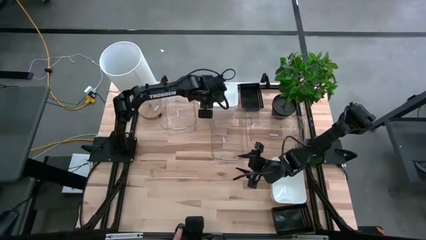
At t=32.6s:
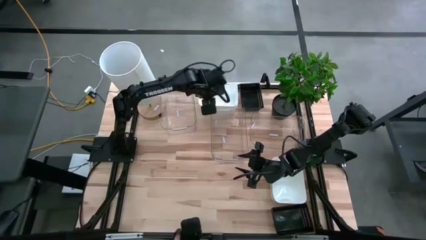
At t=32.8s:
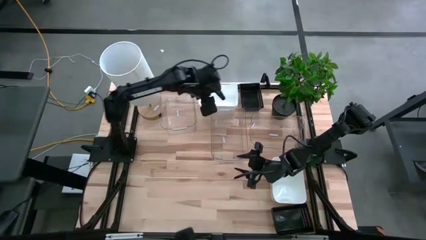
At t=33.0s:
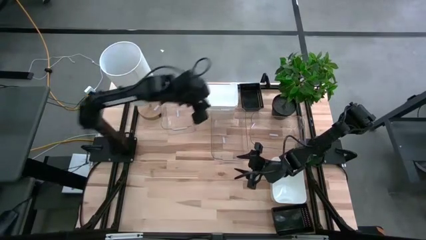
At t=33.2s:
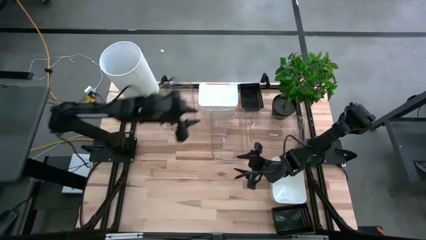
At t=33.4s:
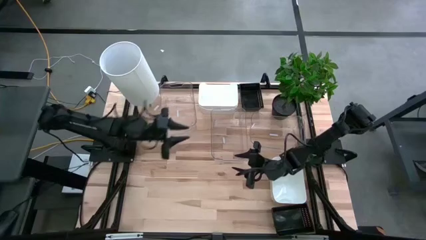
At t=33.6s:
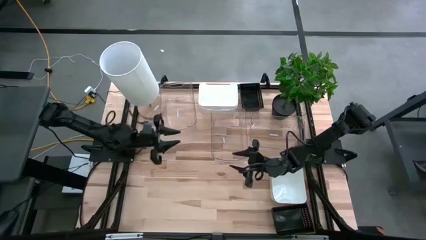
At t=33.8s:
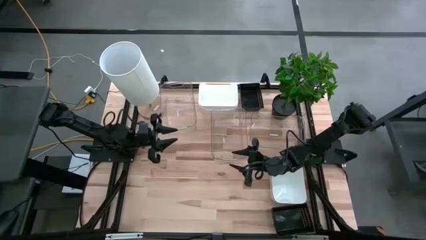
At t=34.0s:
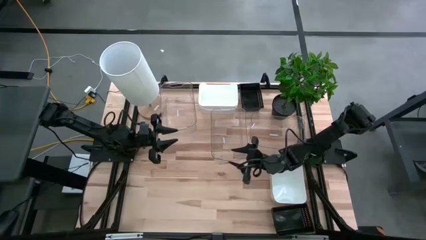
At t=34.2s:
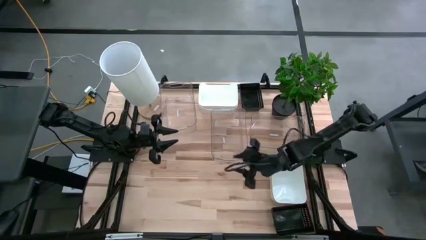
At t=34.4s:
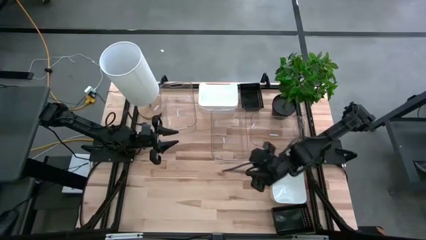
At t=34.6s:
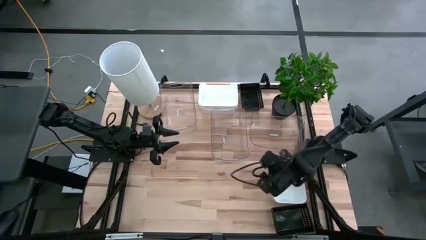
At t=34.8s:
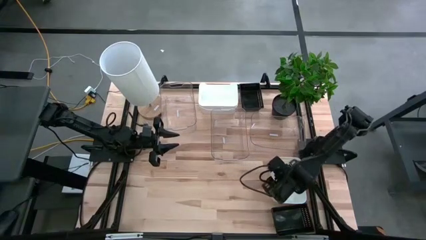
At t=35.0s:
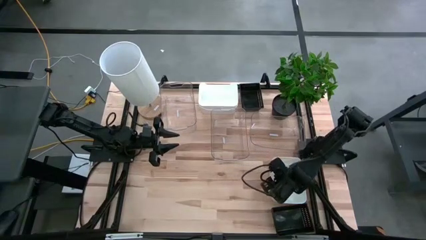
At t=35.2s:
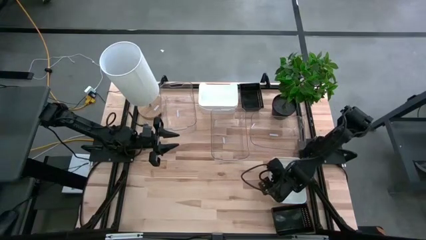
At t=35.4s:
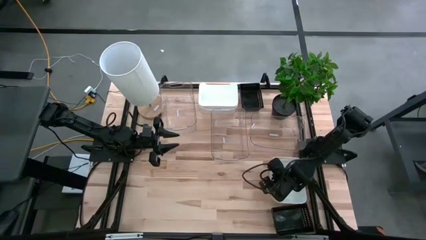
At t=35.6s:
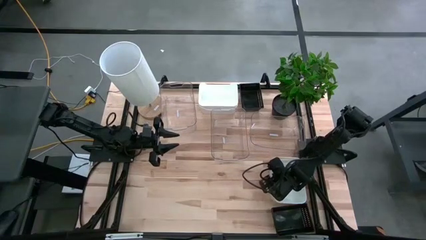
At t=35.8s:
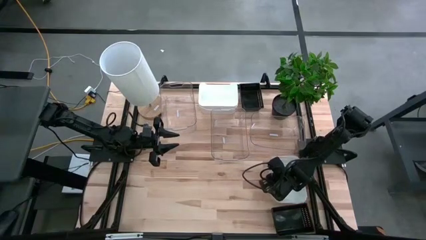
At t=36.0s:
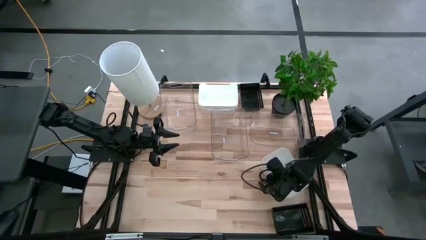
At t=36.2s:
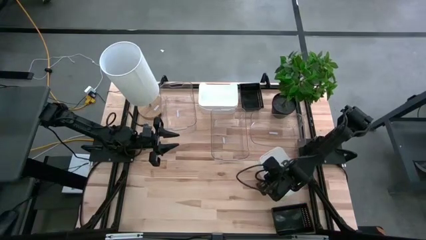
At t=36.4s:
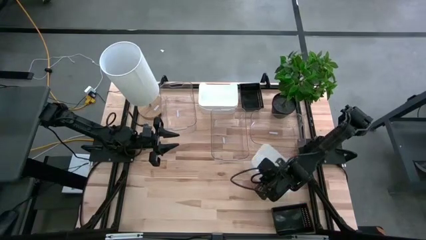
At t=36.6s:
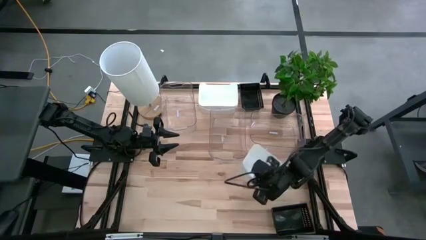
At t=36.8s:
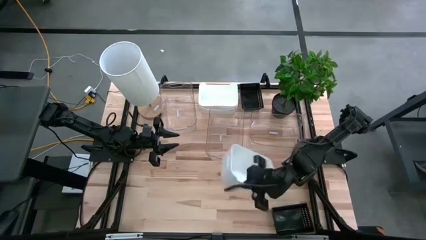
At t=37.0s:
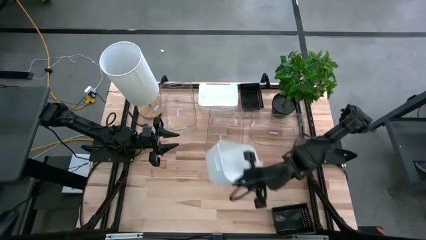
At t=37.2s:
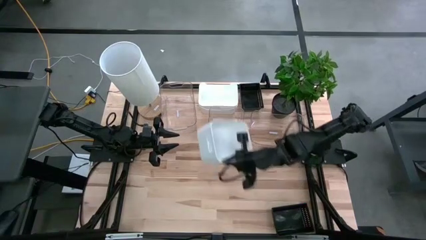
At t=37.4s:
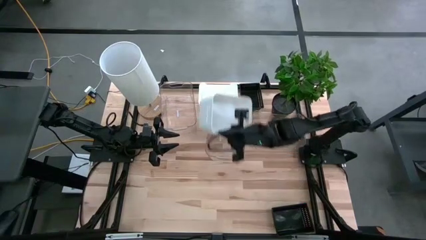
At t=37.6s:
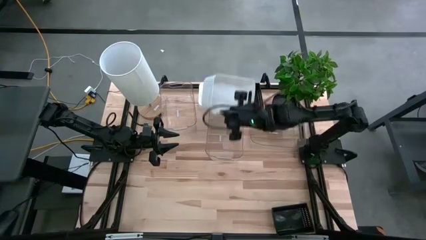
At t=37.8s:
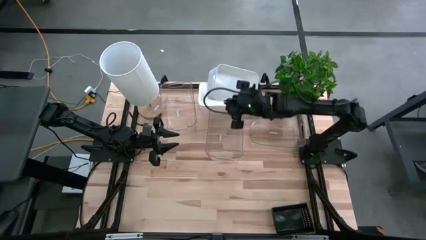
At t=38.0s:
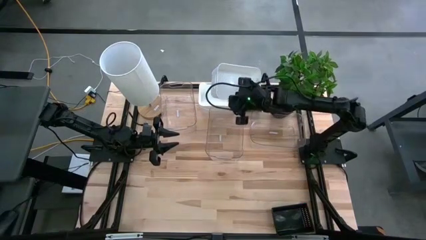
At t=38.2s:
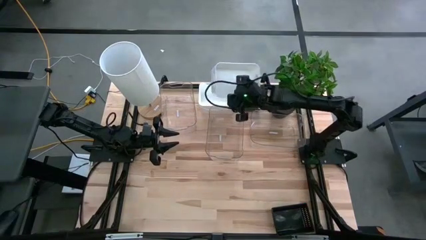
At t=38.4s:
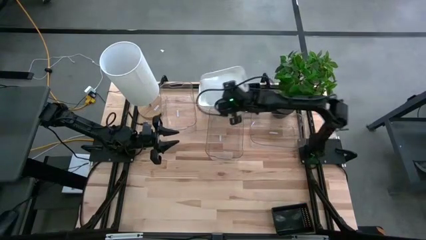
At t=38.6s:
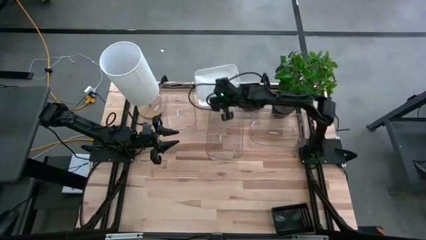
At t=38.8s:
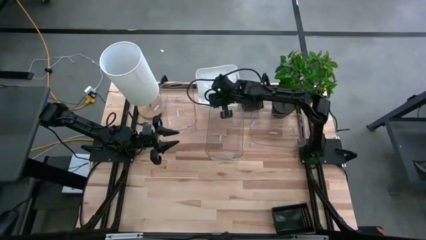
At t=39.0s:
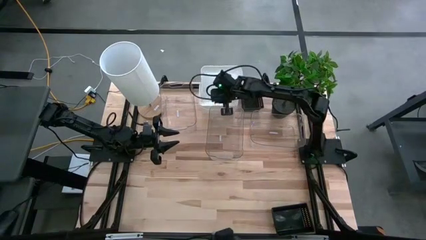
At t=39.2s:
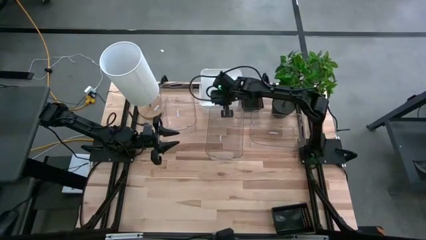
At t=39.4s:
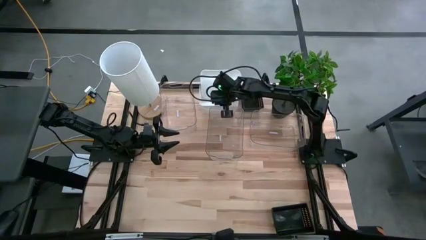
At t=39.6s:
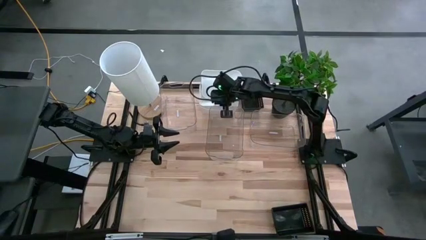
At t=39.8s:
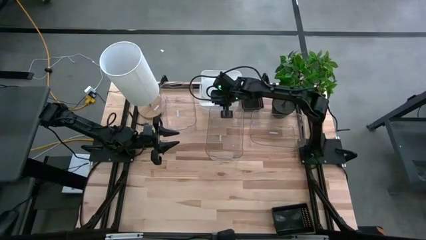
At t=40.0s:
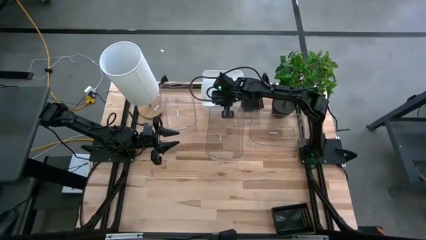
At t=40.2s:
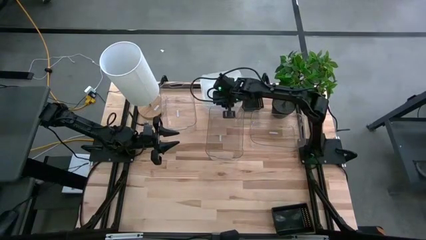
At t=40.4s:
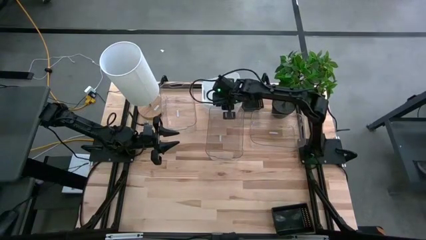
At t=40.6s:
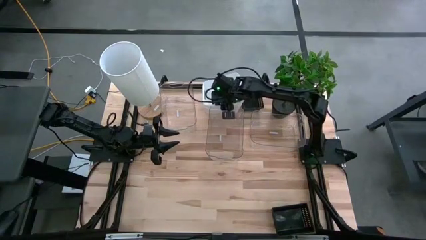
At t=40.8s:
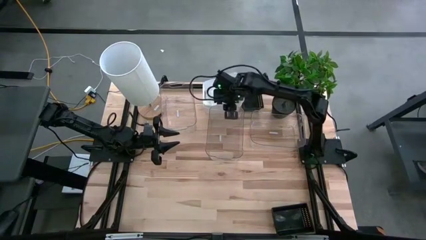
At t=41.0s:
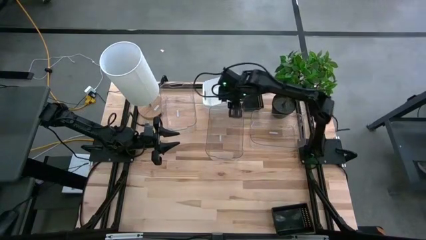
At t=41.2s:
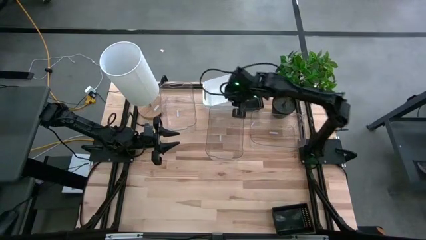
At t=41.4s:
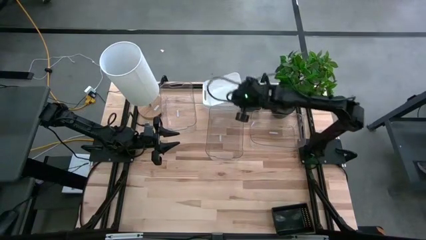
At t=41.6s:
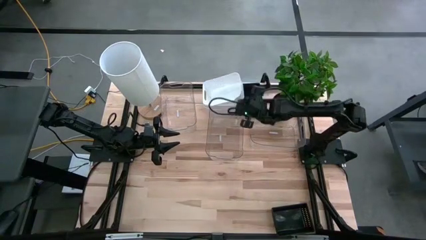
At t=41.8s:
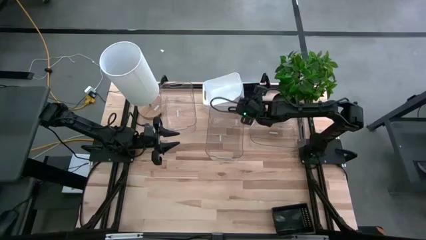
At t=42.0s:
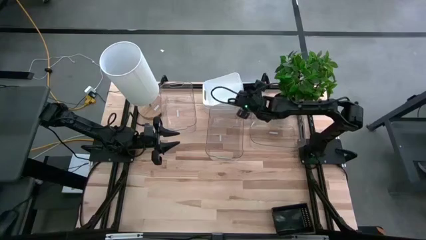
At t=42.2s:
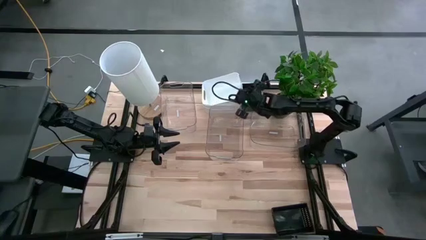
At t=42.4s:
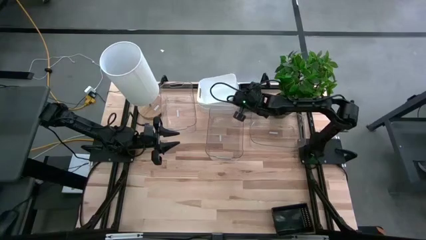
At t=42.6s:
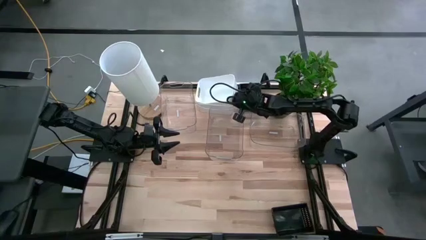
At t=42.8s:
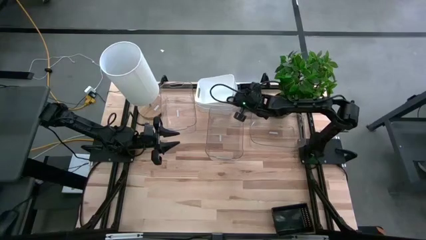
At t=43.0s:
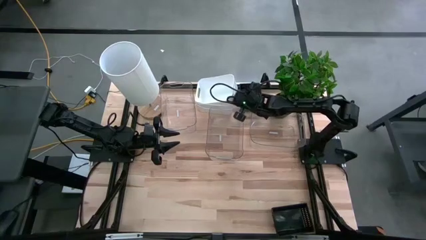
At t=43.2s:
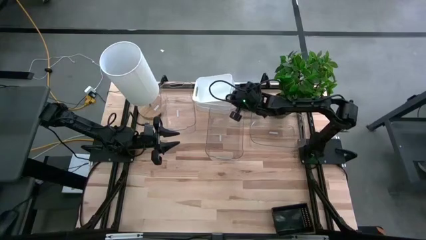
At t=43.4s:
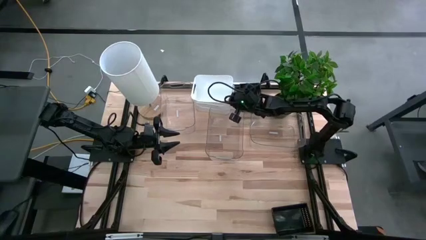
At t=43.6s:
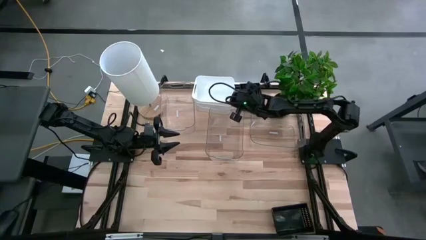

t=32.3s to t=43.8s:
Stack the bottom white bin on top of the top white bins

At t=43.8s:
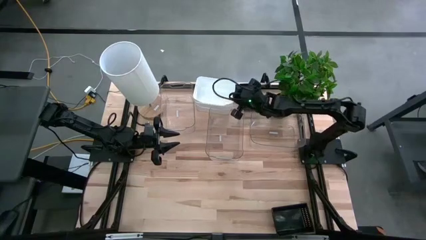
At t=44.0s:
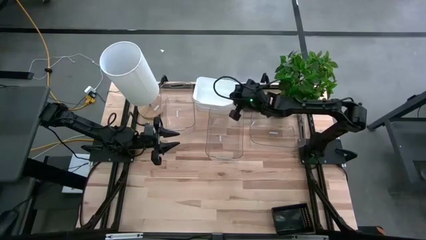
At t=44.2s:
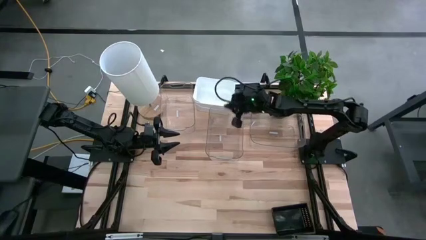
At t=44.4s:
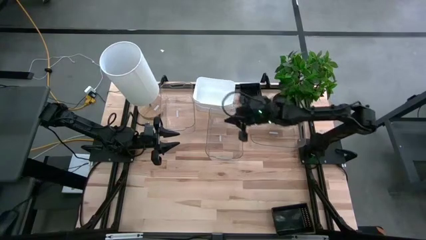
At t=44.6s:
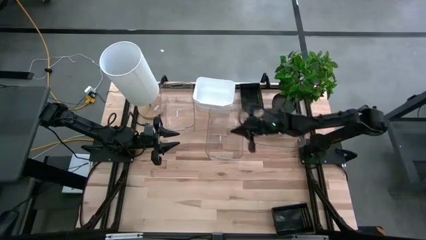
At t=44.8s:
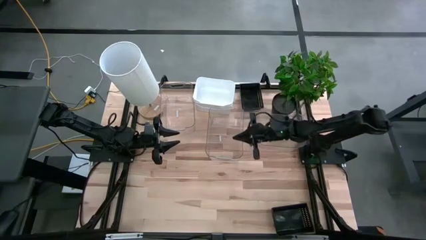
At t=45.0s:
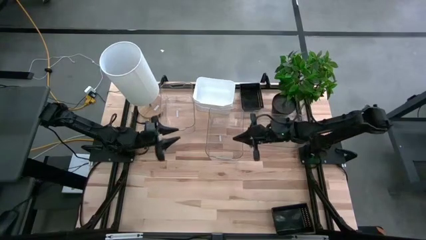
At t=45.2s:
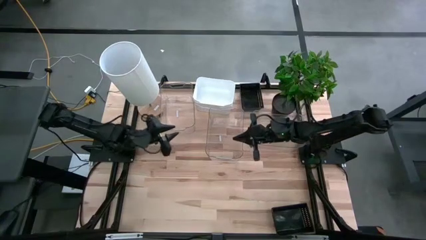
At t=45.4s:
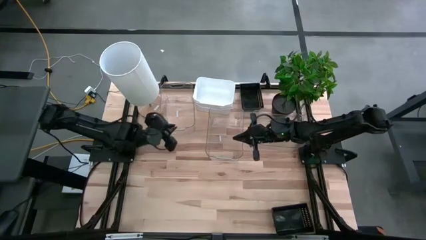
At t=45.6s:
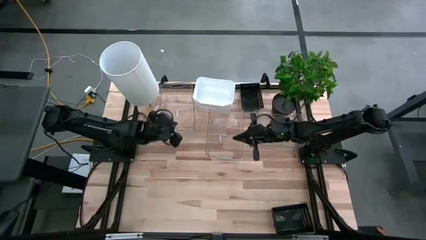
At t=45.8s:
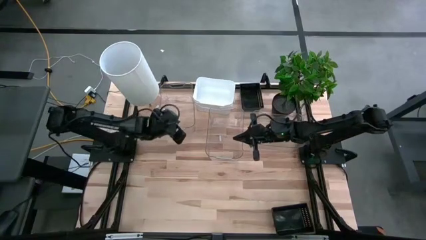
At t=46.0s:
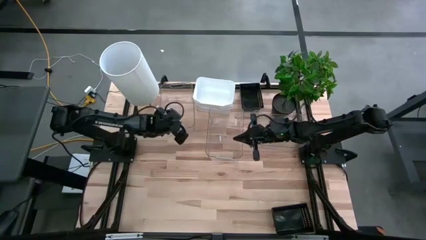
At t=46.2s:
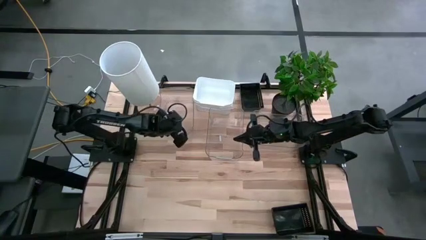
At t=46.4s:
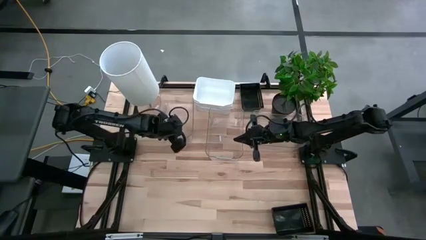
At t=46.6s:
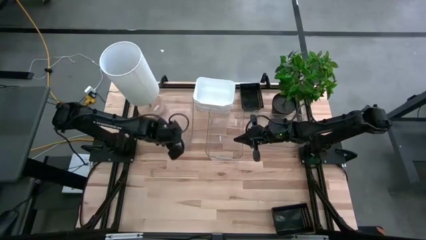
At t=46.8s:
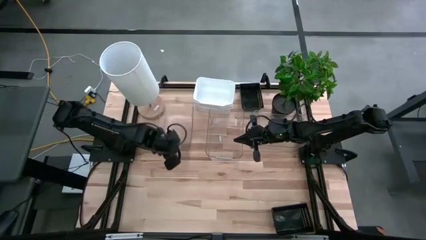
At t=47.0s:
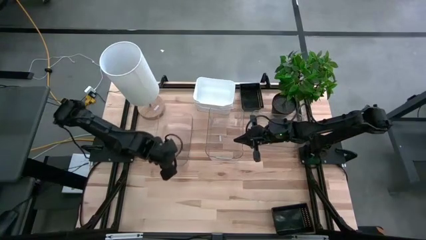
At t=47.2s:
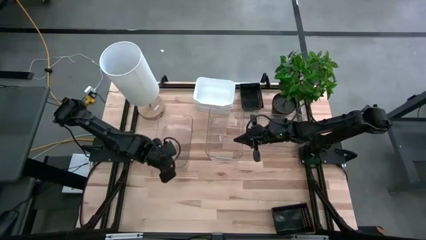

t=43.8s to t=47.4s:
Move the left transparent bin to the left of the table
